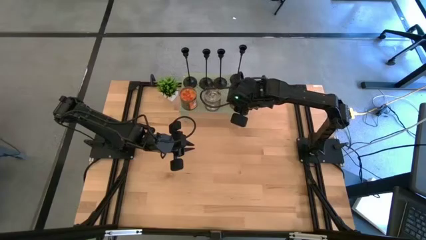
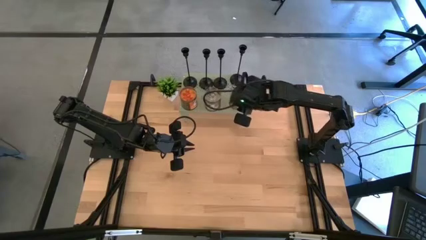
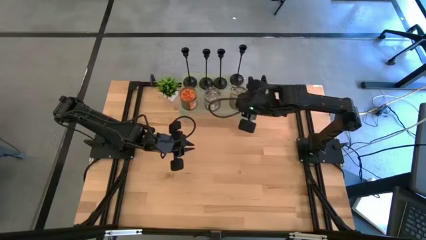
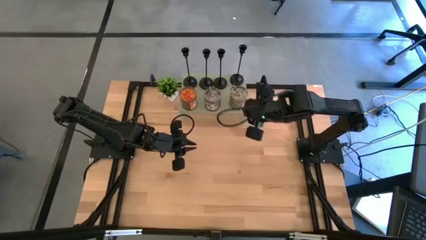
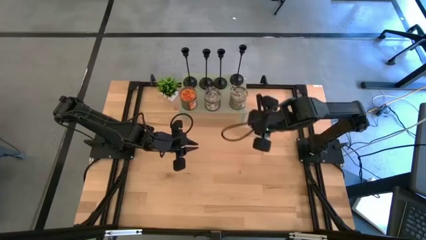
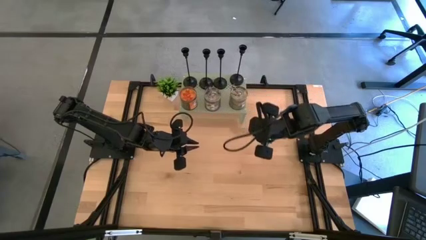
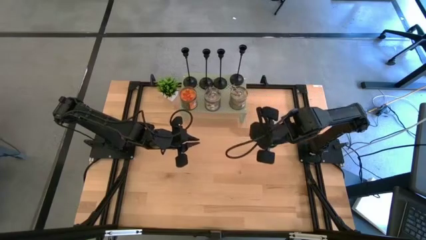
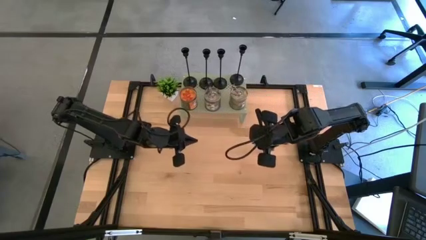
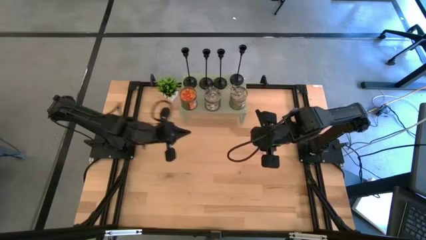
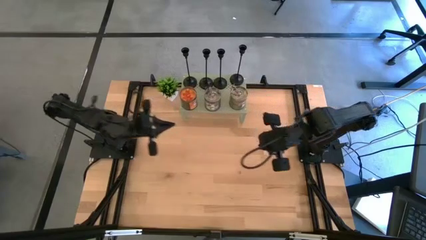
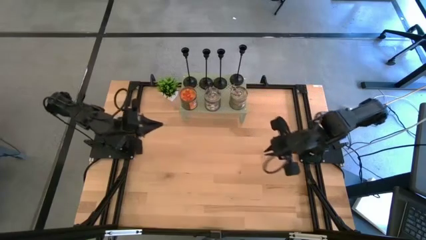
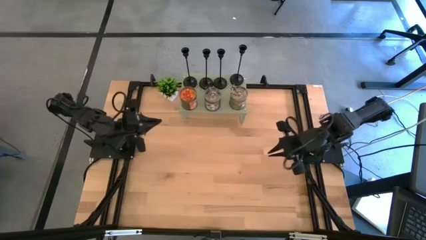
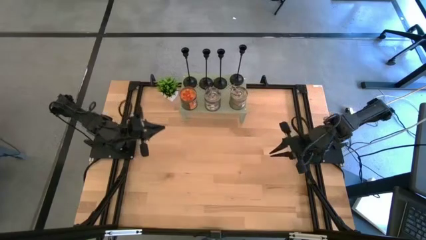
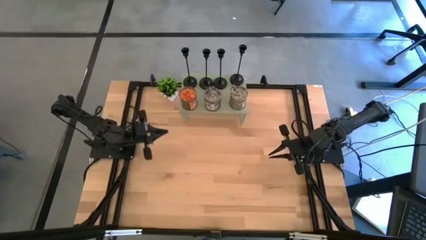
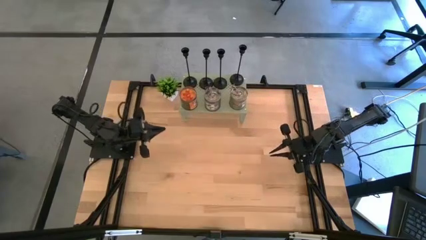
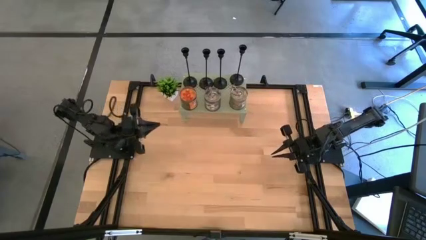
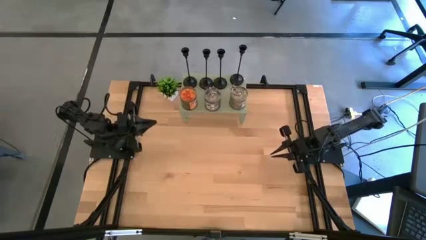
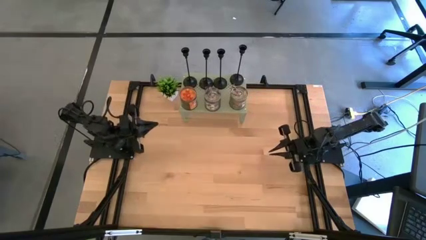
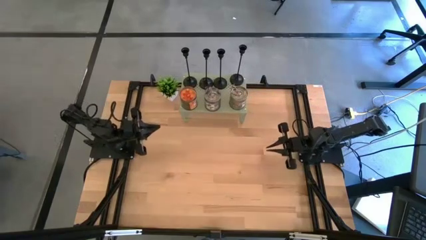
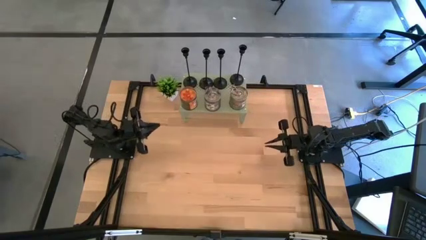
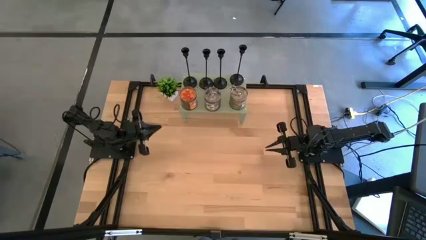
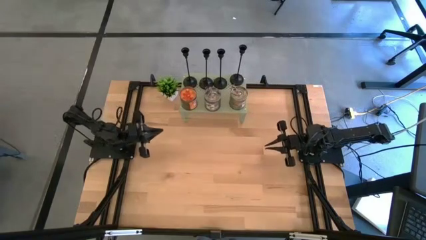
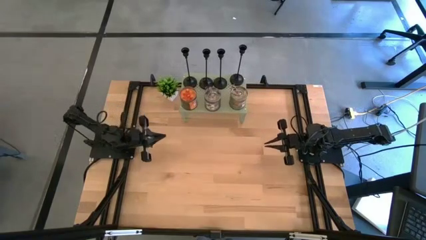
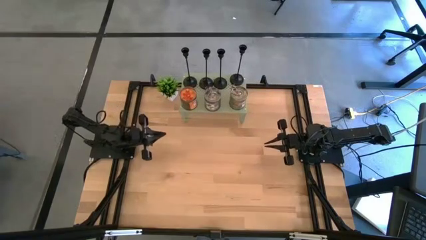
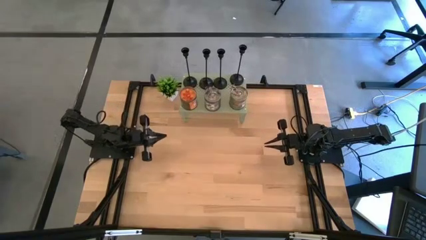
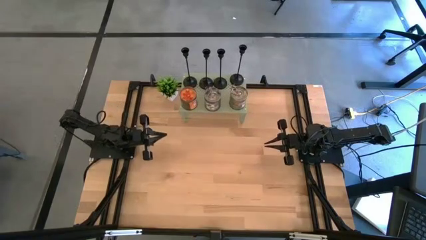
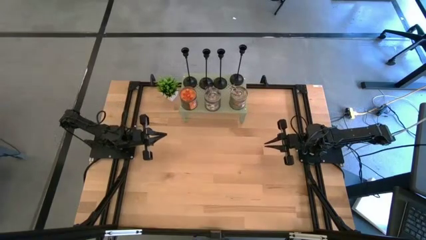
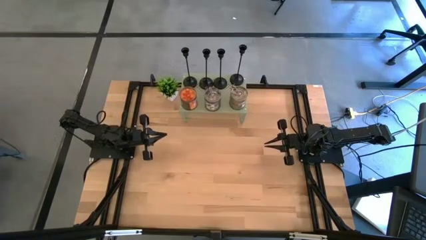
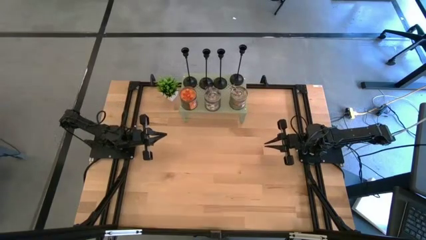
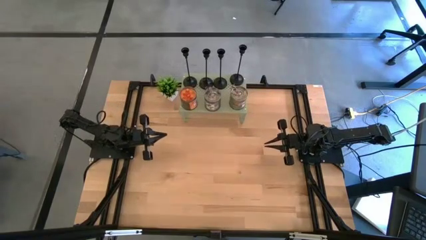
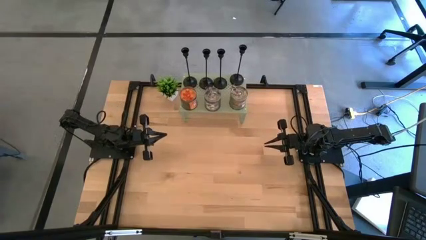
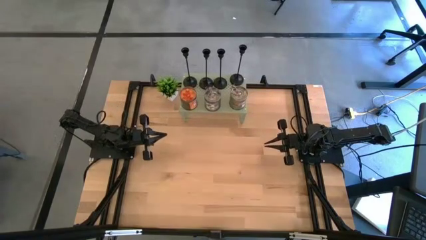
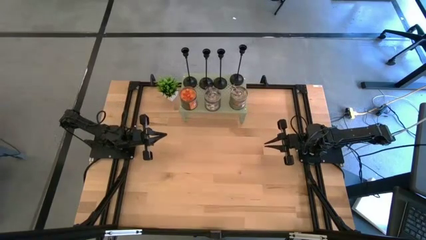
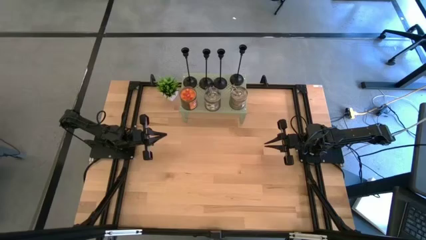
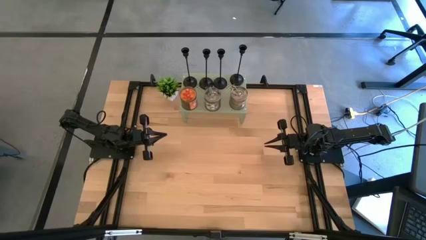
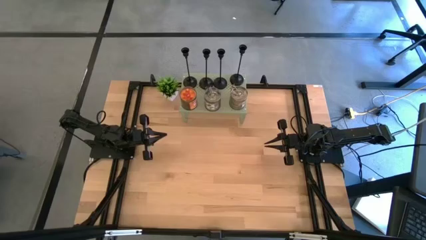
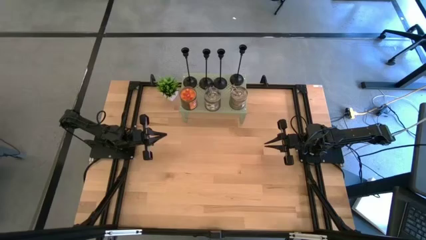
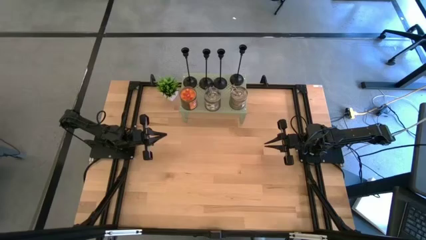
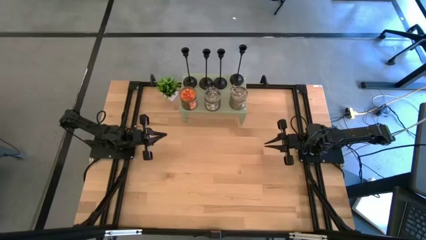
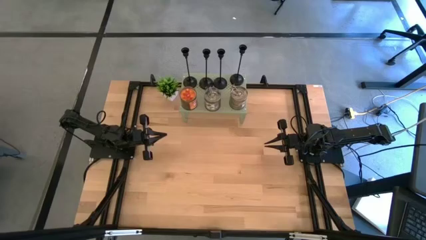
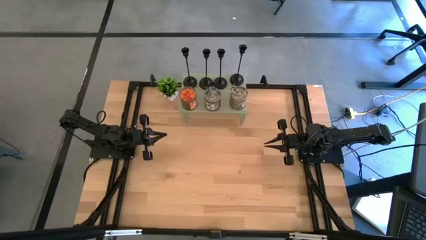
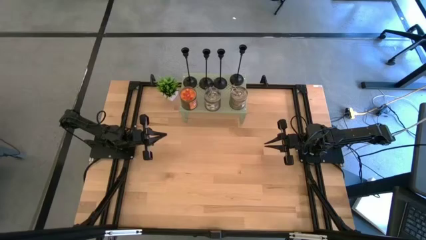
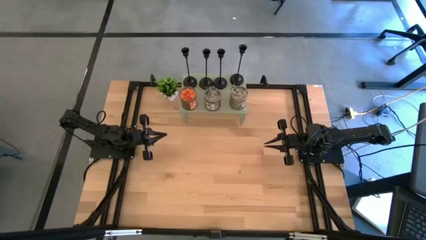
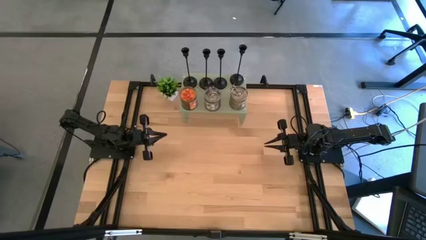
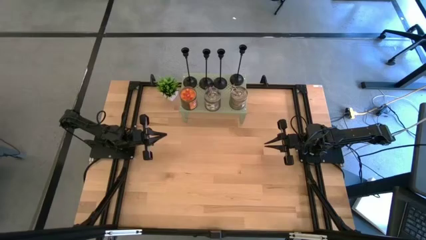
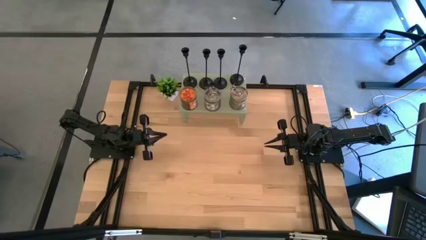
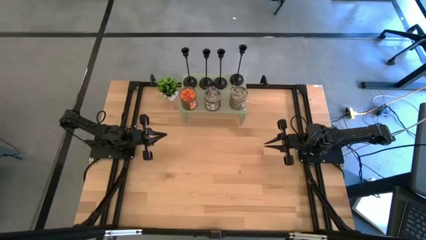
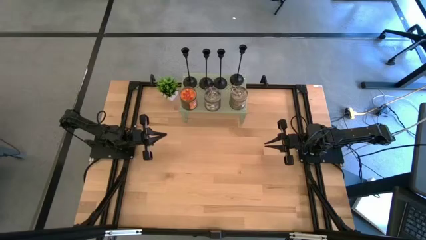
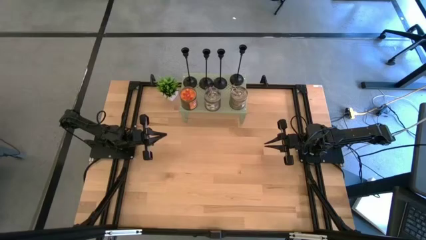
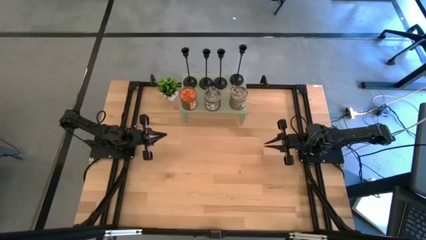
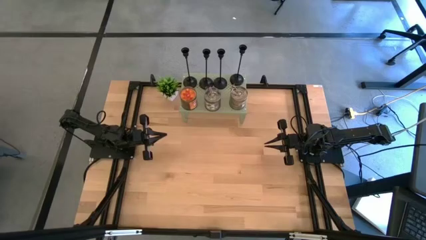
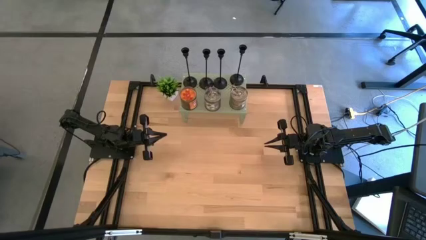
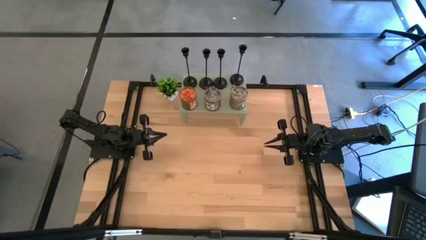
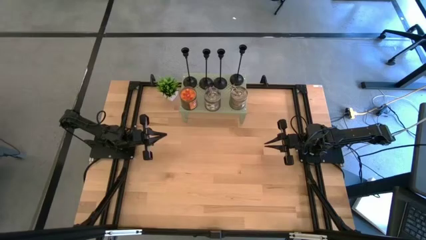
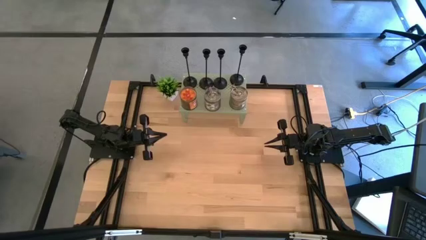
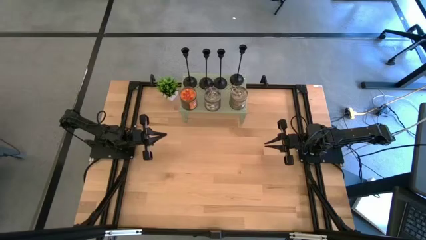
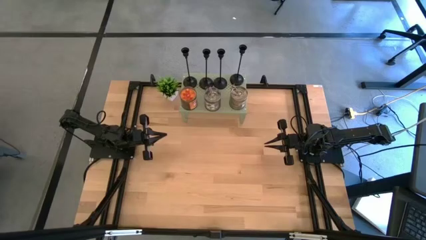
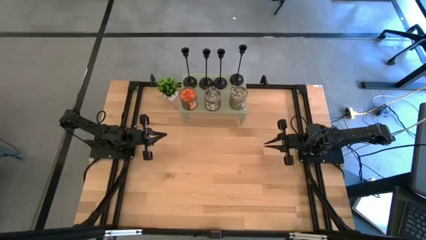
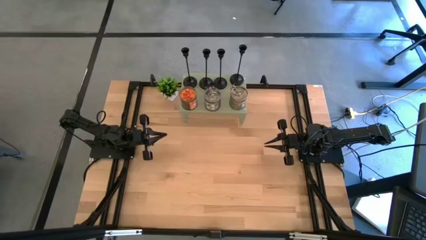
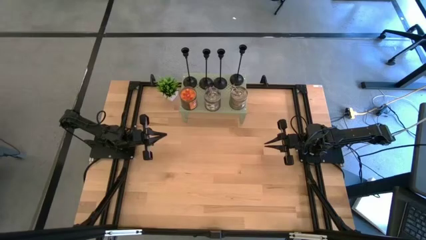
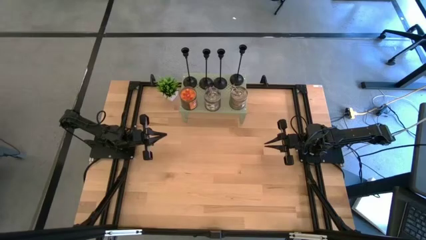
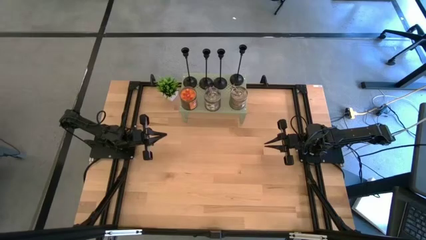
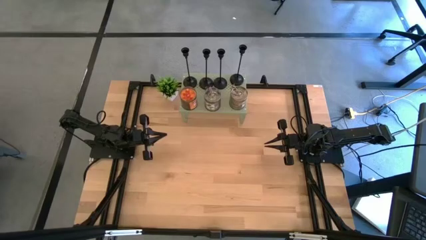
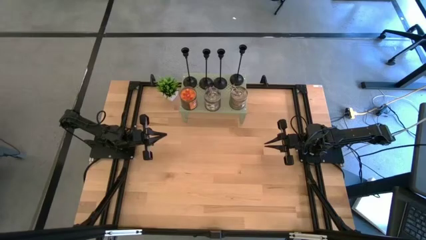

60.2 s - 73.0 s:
Task: Pick & Place candle stick holders
Return to Home Position

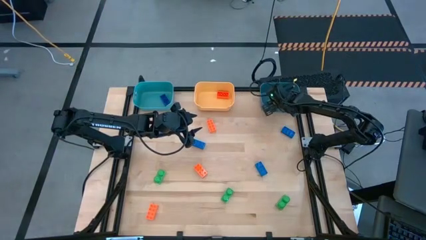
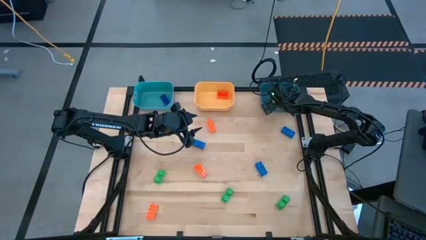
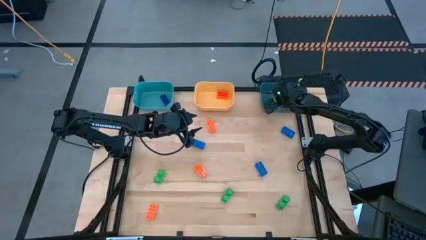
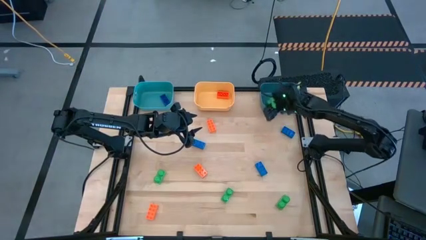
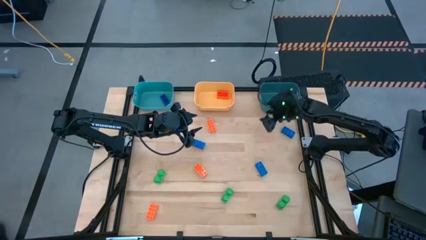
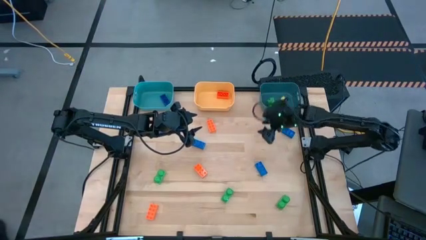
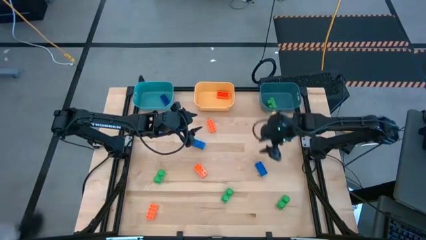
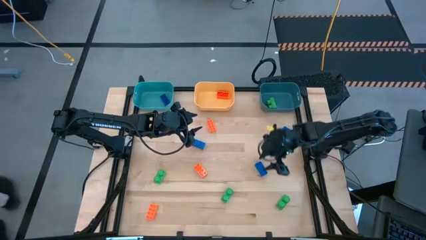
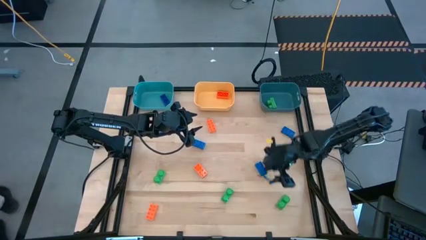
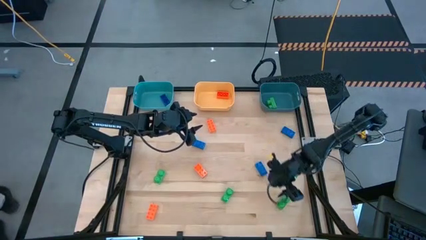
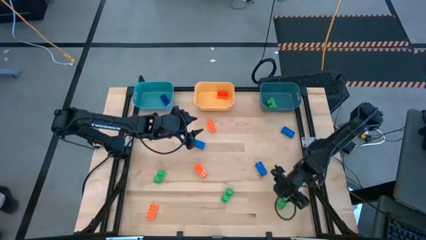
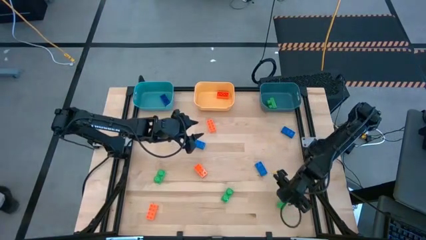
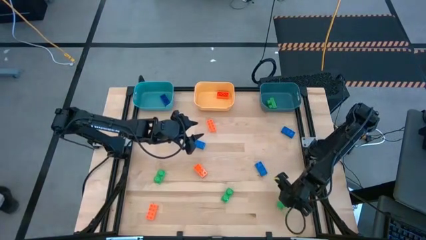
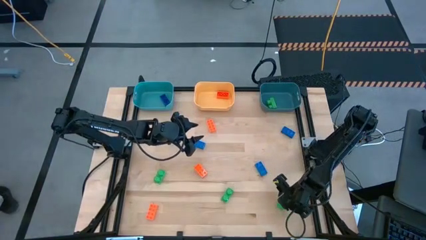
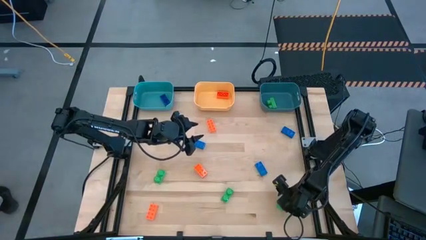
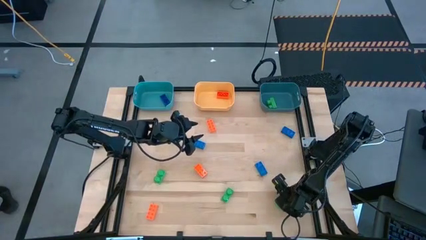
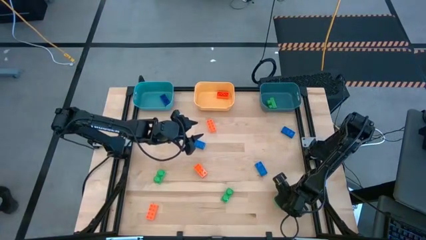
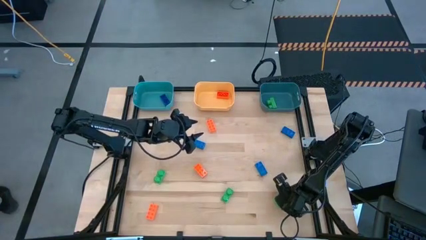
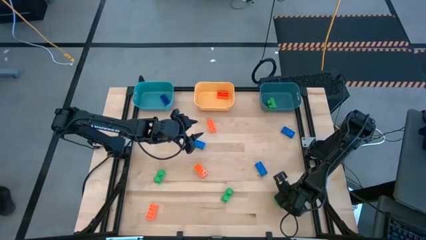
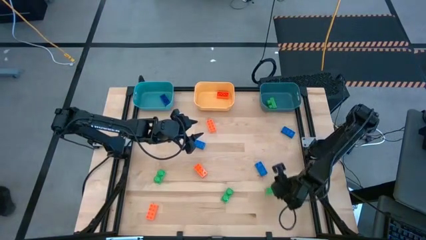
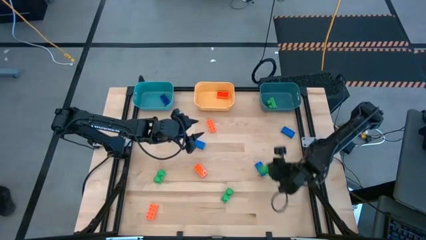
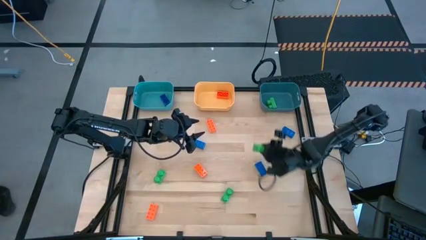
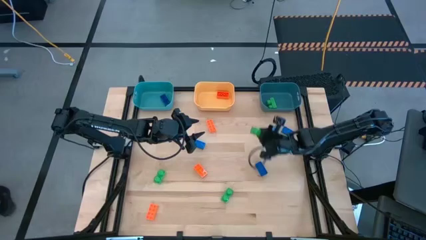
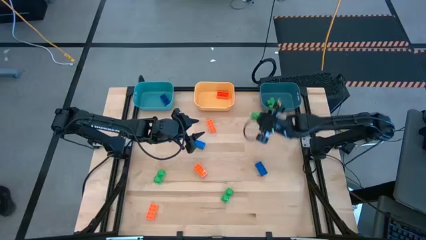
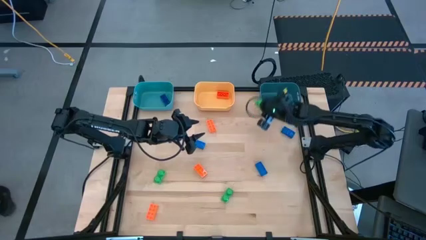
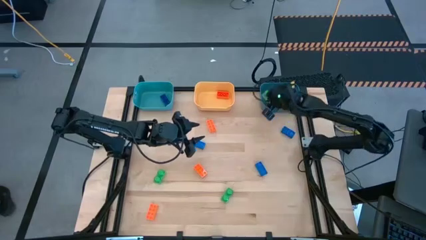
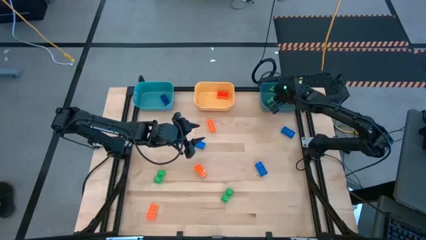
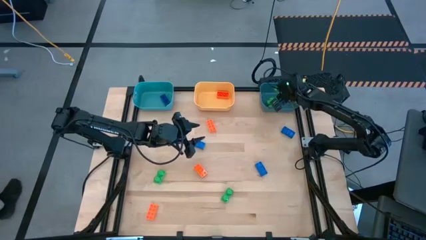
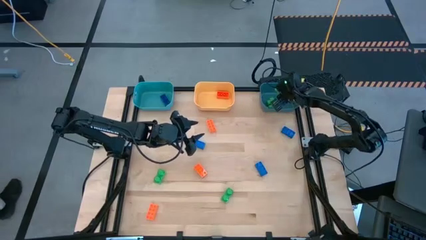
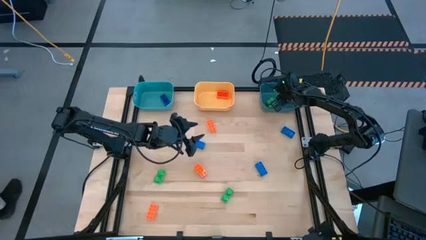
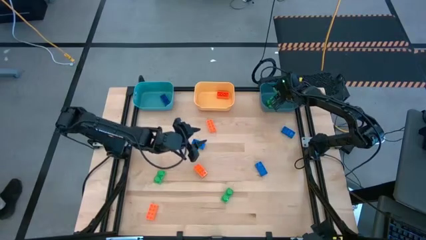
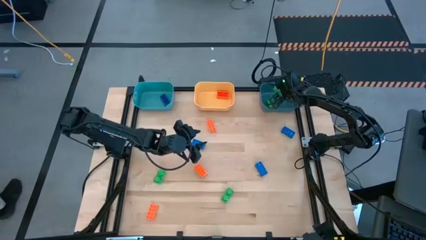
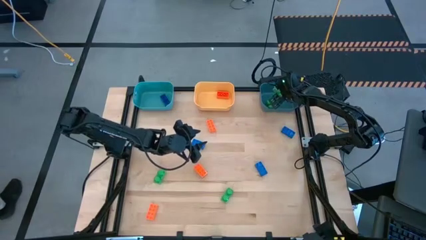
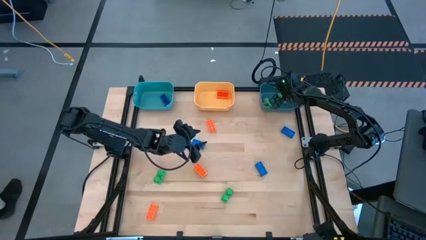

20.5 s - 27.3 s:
Task: Sort & place blocks by color
Put the green game piece into the dark blue bin
